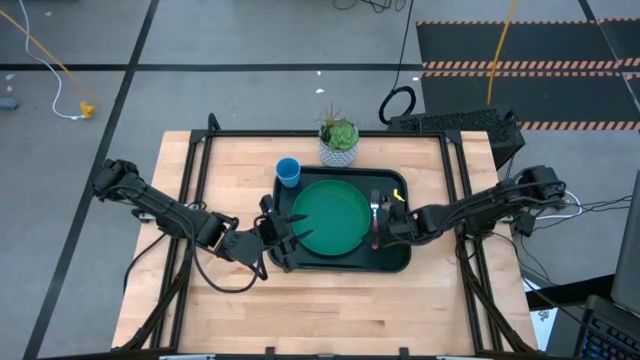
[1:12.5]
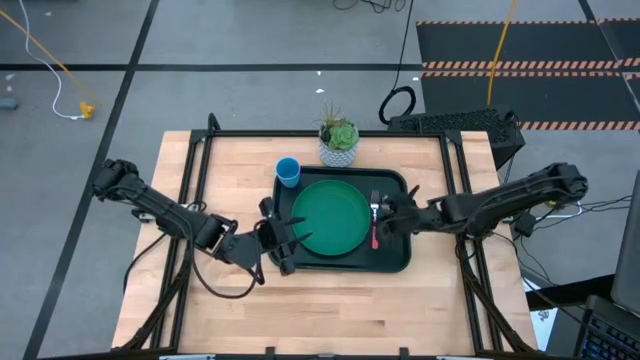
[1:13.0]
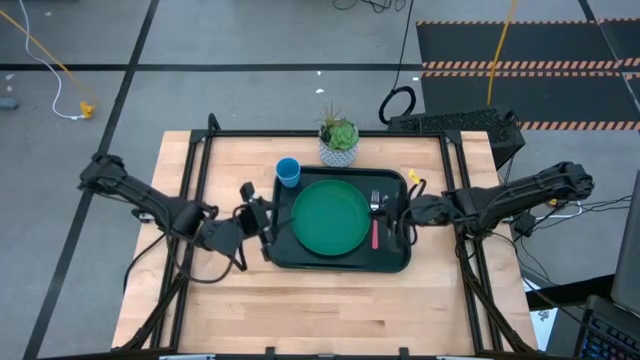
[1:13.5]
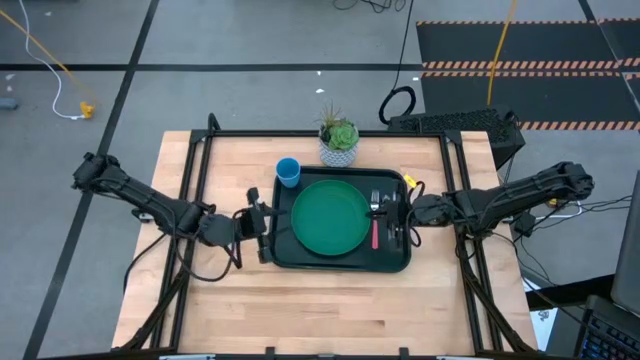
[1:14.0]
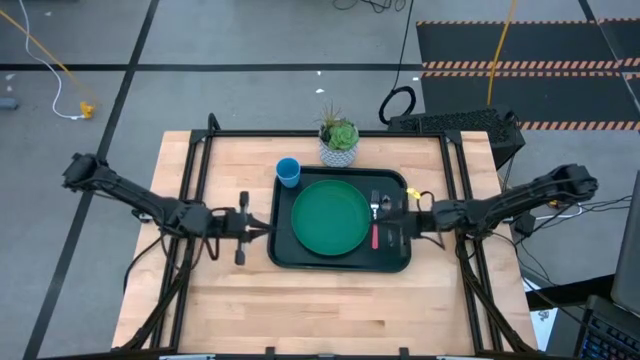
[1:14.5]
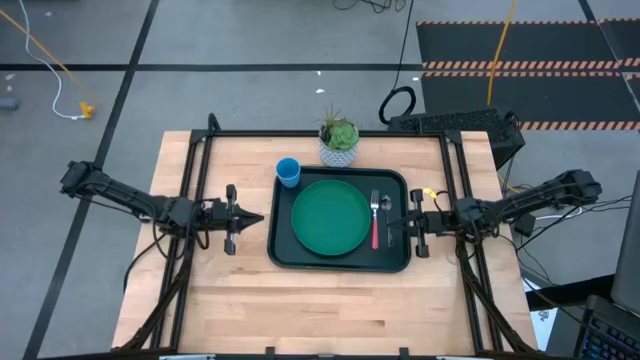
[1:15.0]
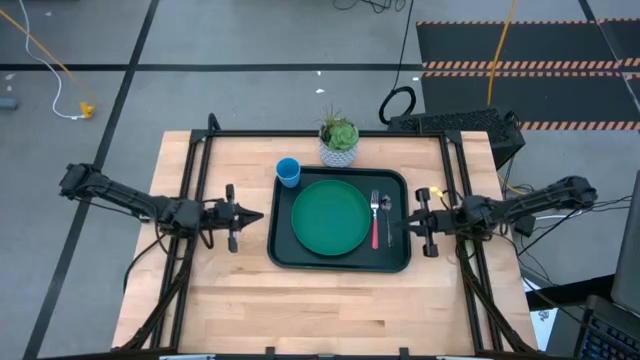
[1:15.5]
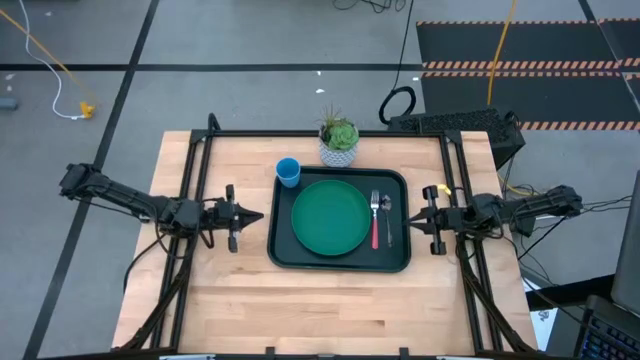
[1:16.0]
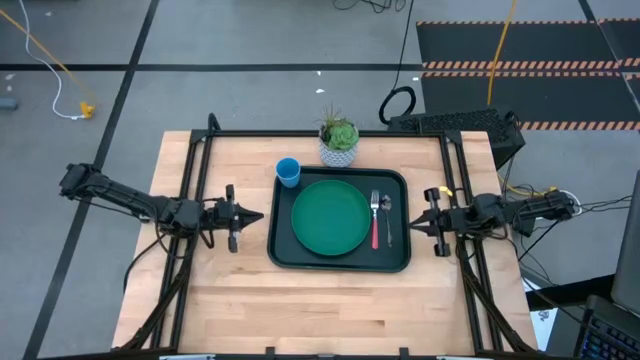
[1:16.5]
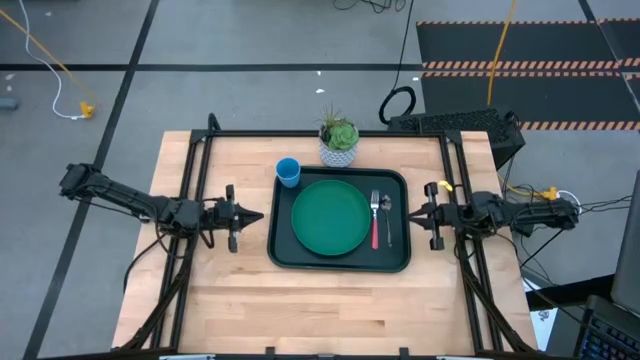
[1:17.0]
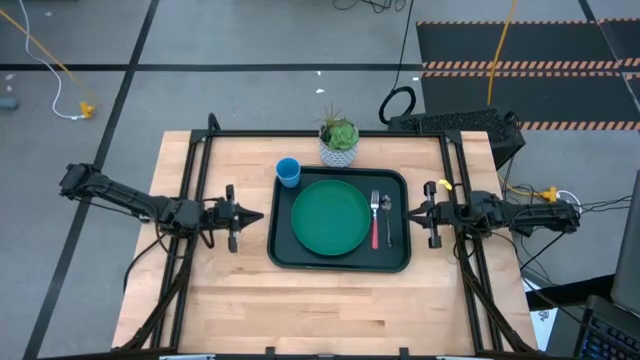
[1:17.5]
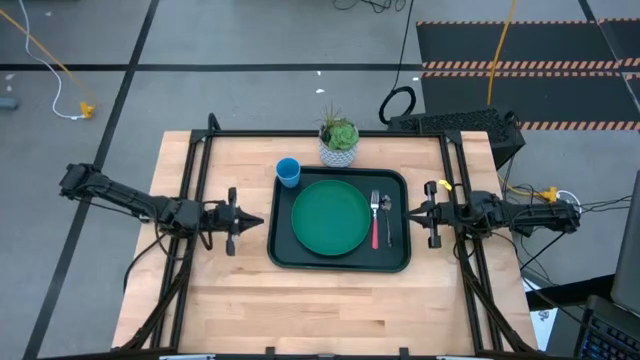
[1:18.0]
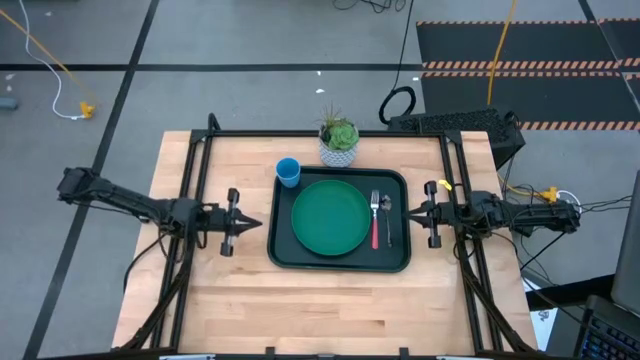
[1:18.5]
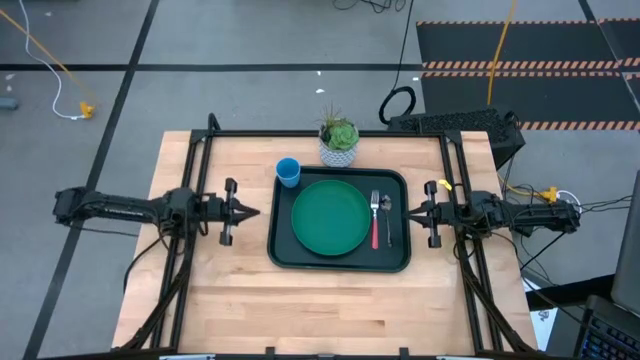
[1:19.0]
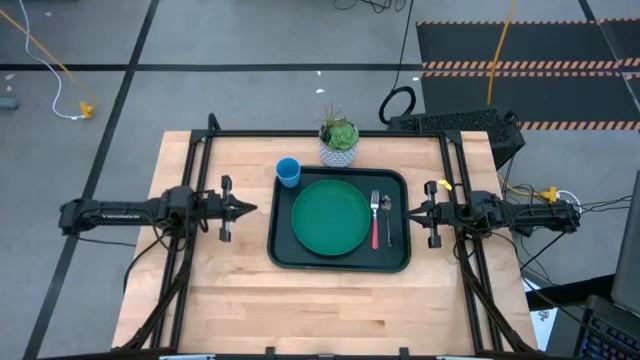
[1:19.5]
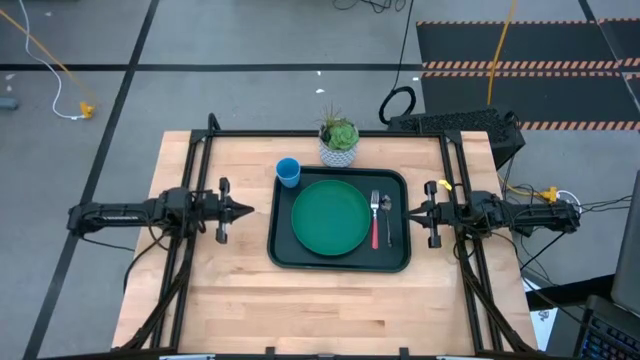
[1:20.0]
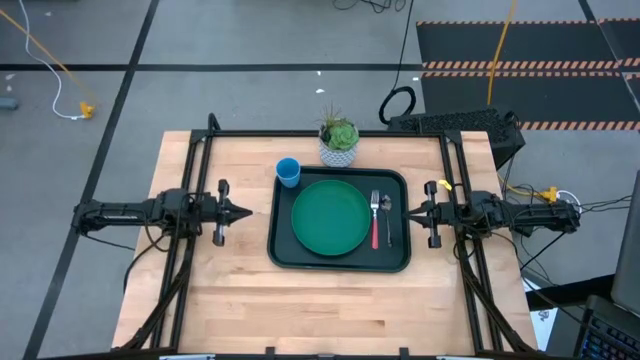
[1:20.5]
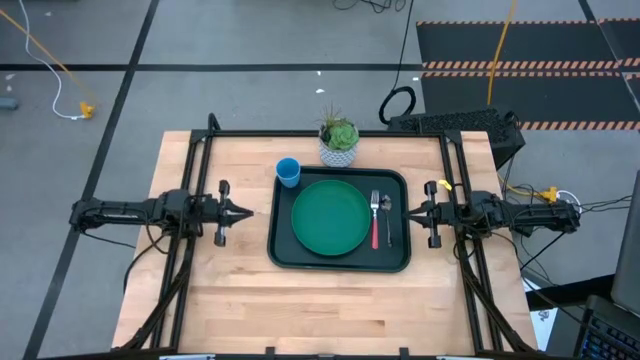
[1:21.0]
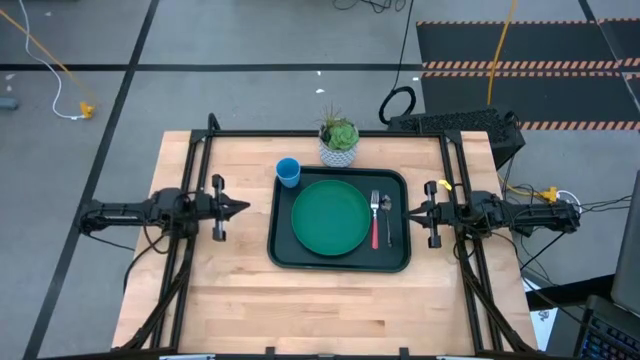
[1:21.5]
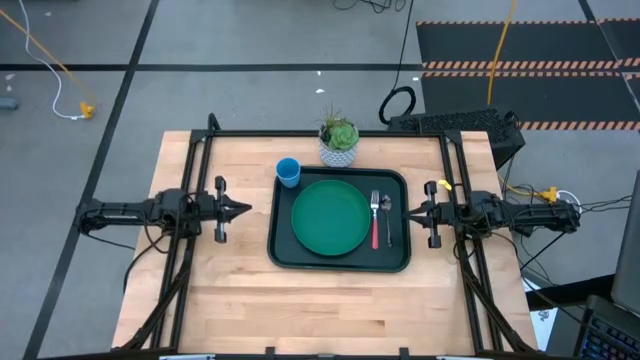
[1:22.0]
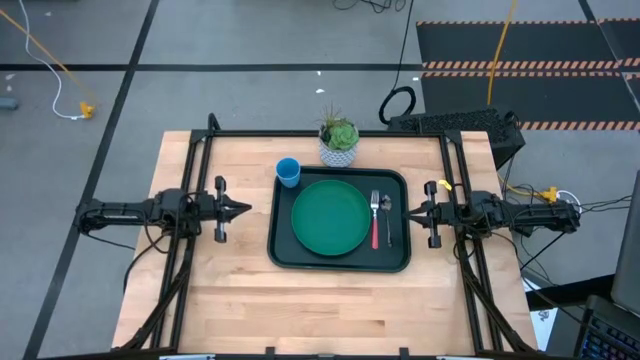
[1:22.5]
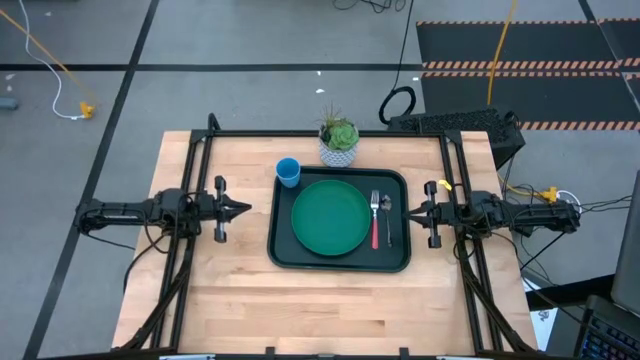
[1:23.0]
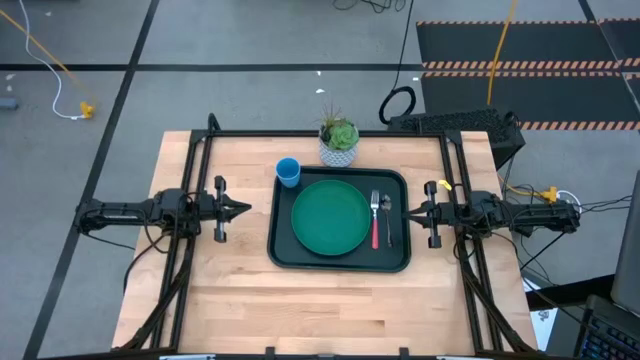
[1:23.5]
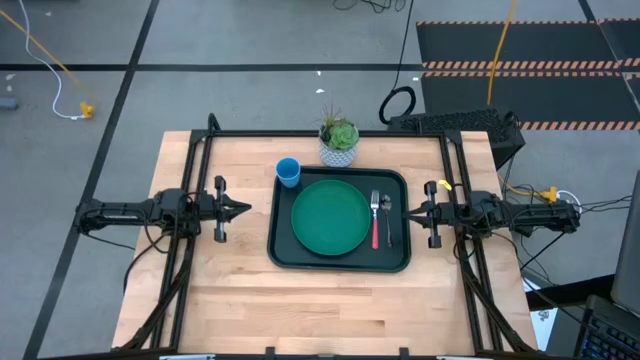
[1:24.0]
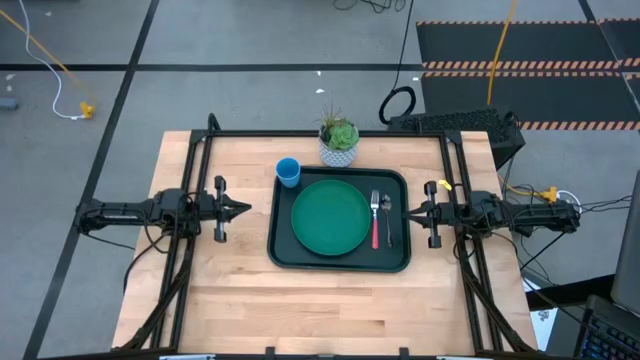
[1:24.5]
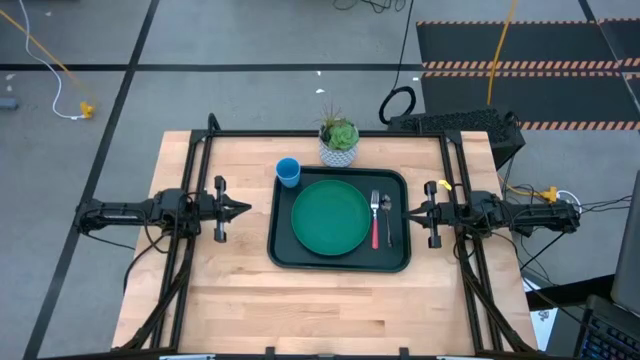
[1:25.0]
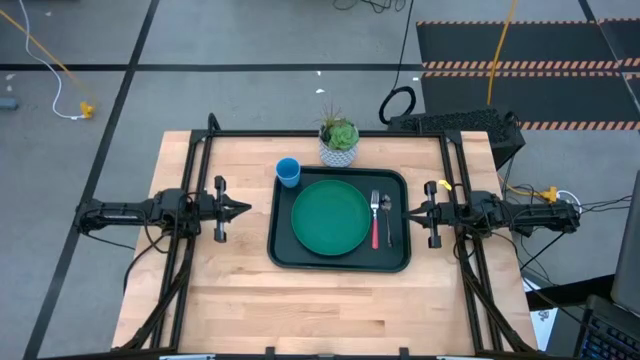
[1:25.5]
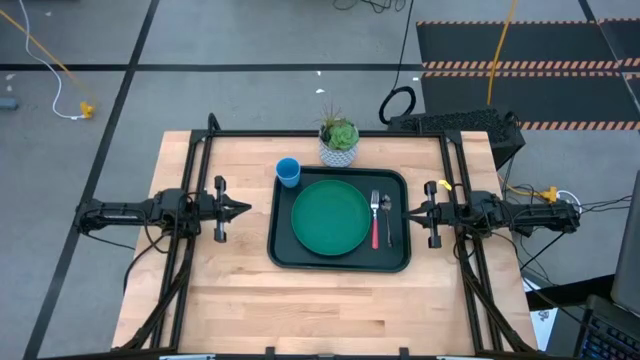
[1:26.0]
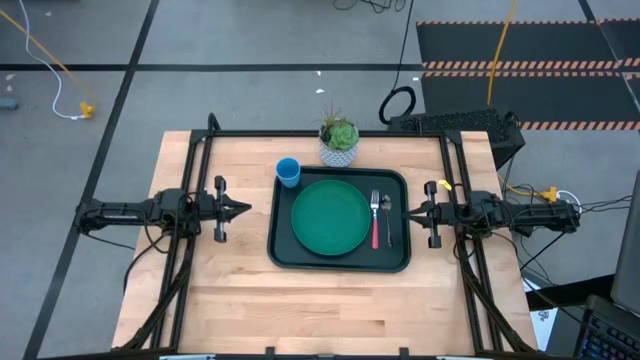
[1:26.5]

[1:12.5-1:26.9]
Task: Pick and place plate/cup/fork/spoon on tray
Return to Home Position

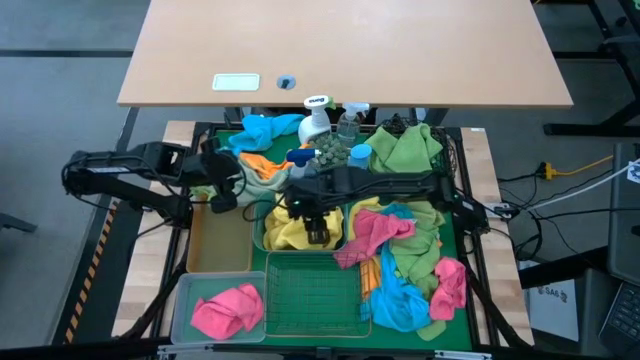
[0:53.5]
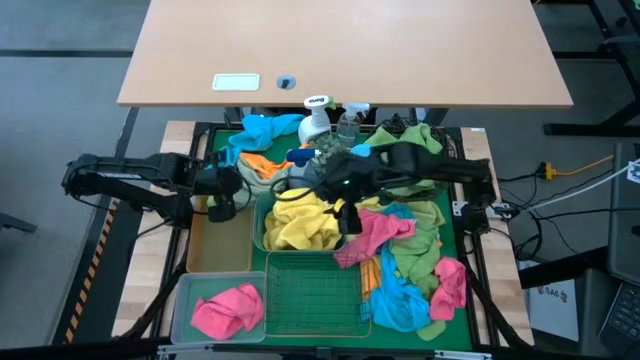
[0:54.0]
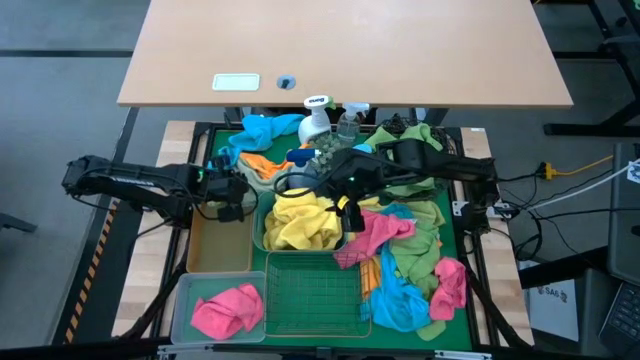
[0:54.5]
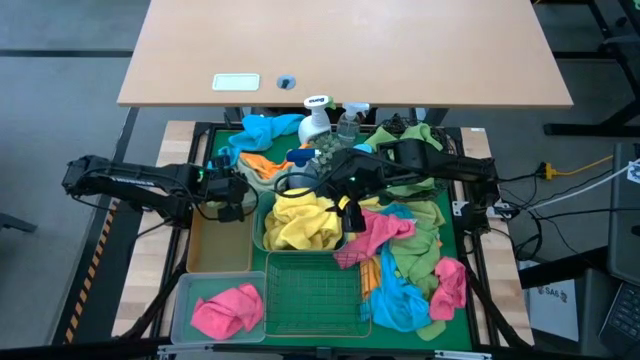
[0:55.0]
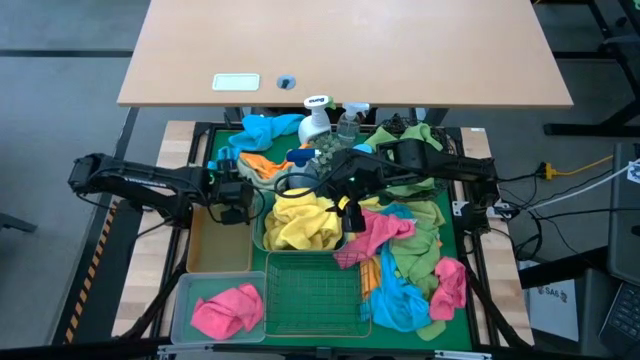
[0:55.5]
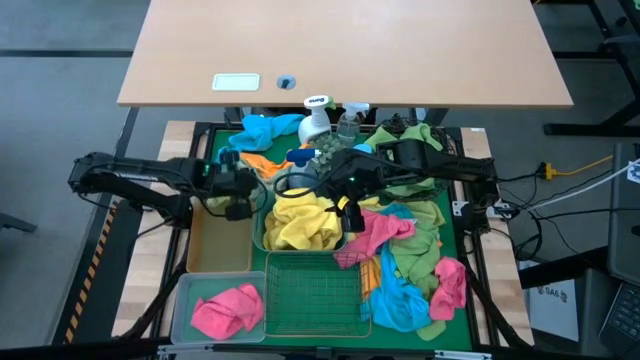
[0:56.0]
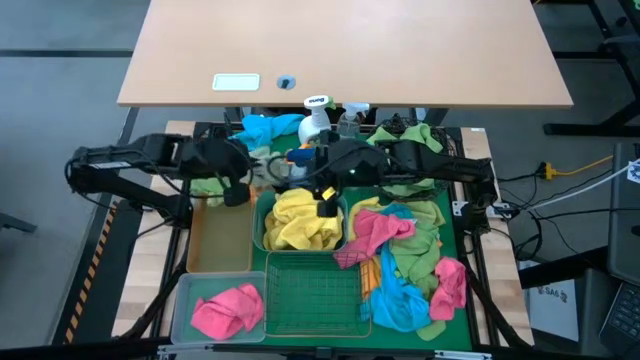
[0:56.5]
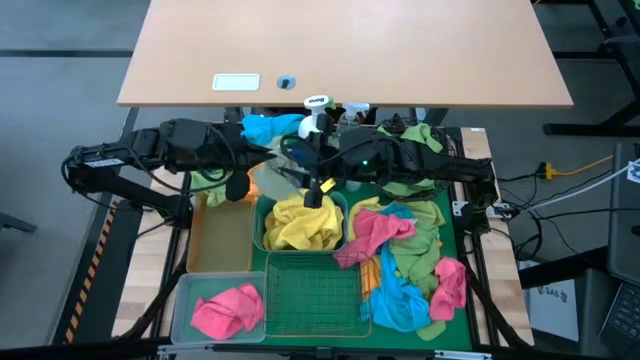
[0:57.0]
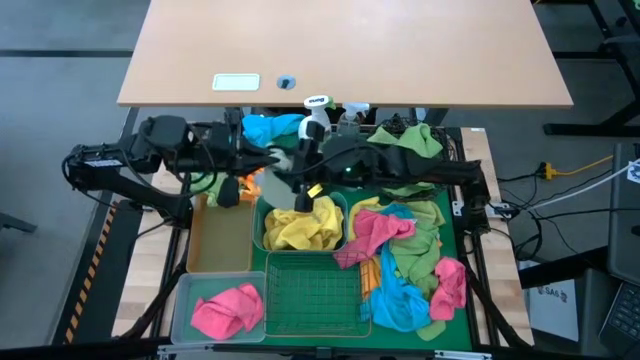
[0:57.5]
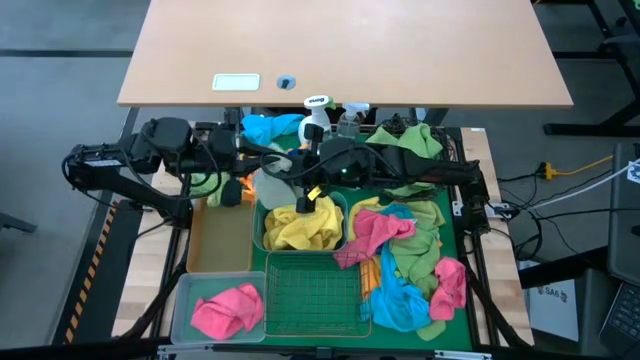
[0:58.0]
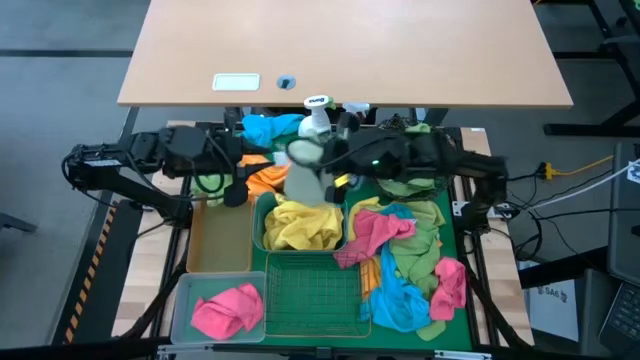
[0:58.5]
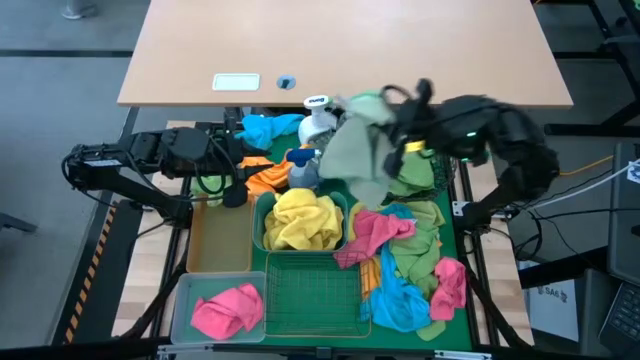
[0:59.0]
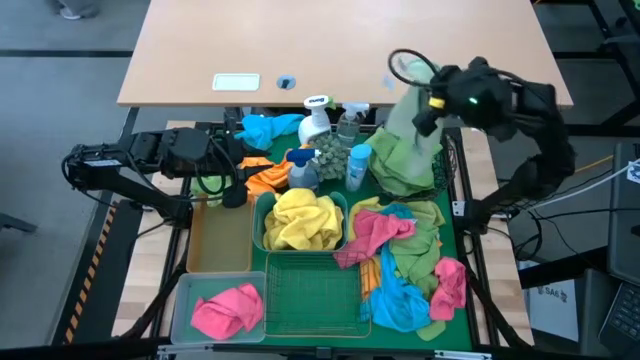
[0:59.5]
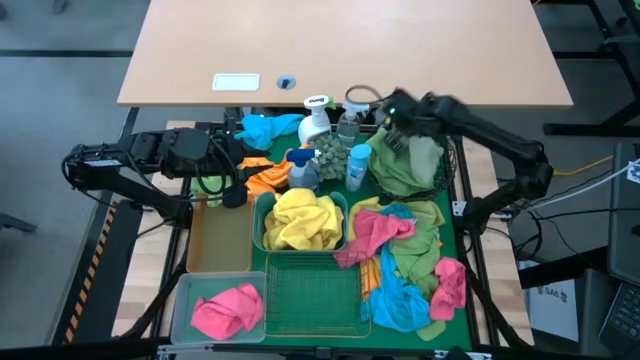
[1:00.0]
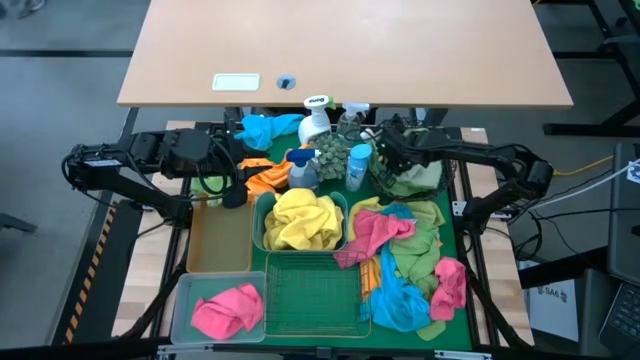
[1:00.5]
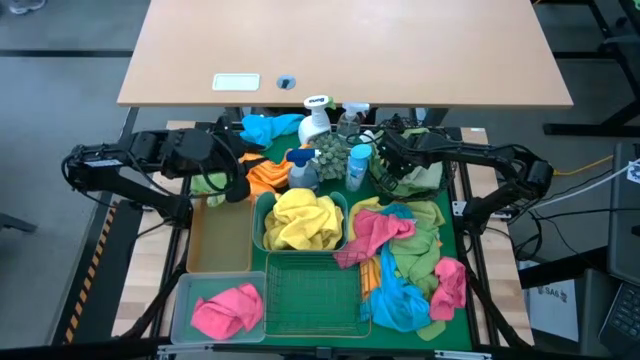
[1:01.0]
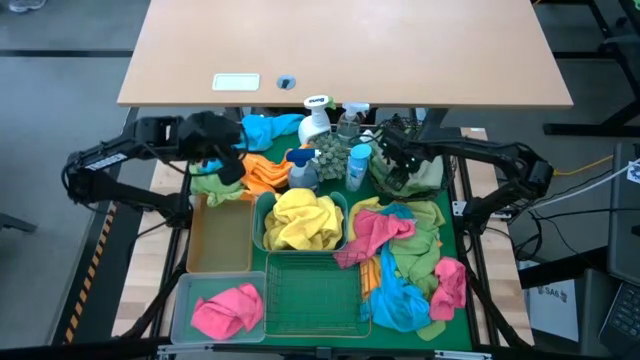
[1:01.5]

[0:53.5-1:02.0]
Task: Sort microfiber towel by color & place in baskets
Put the light green microfiber towel into the black wire basket
